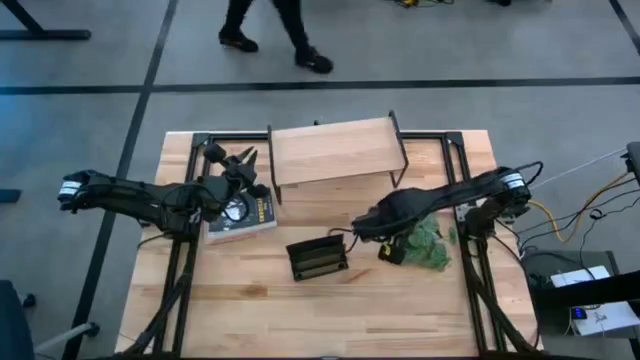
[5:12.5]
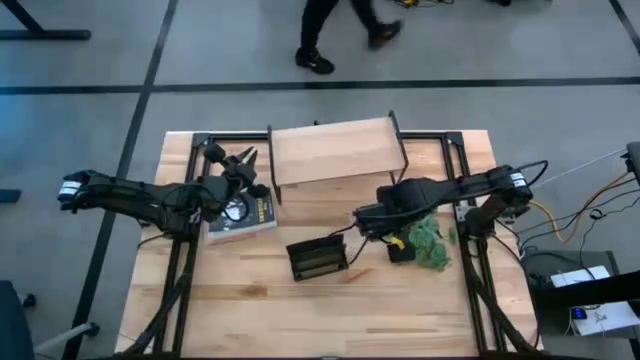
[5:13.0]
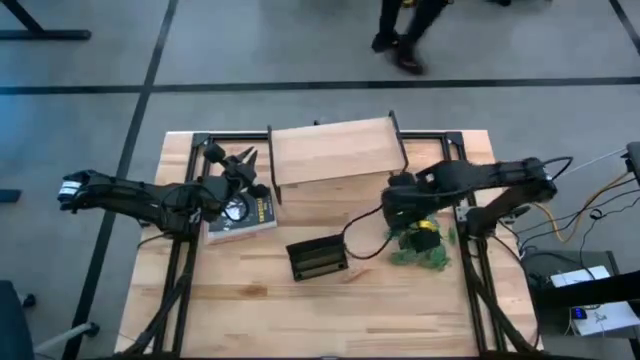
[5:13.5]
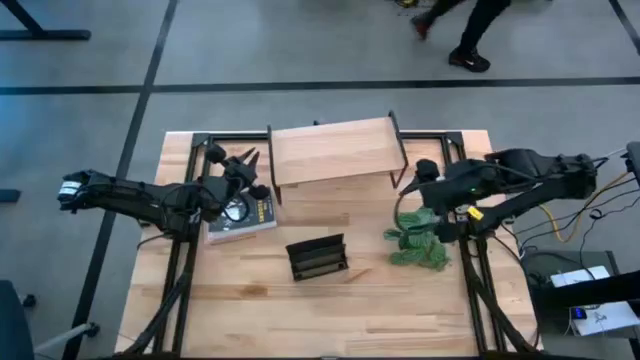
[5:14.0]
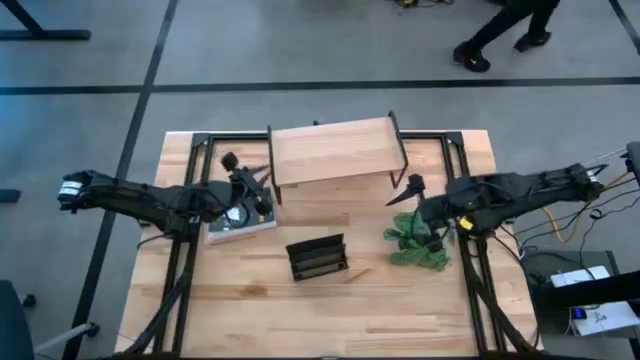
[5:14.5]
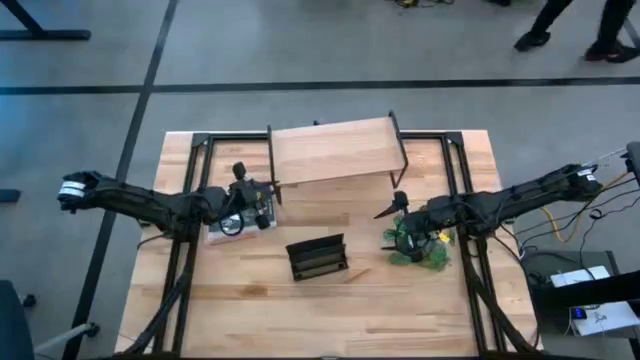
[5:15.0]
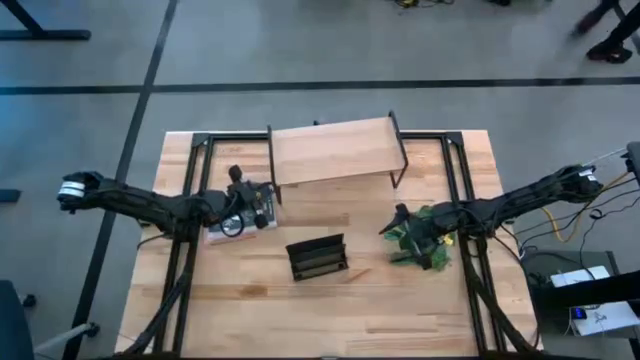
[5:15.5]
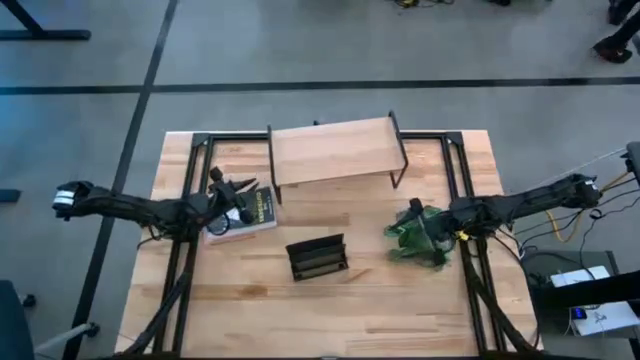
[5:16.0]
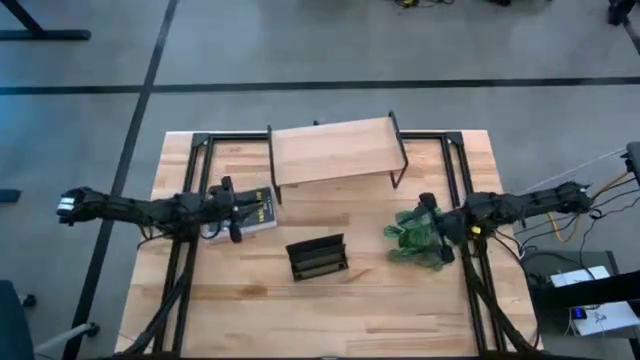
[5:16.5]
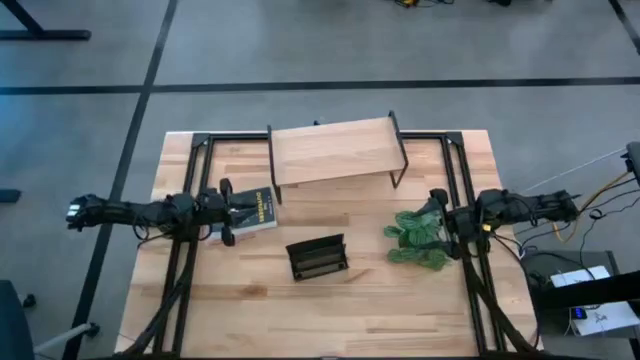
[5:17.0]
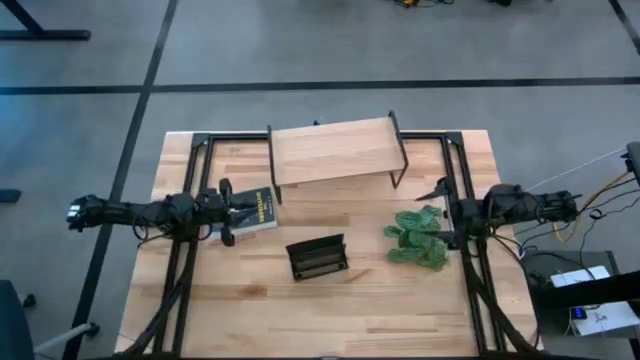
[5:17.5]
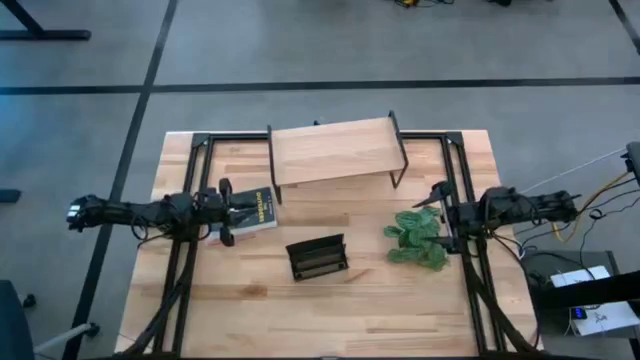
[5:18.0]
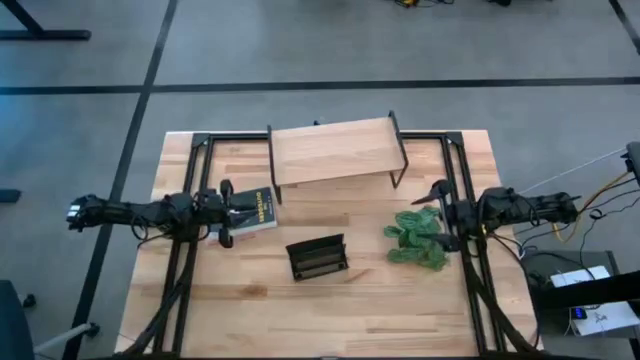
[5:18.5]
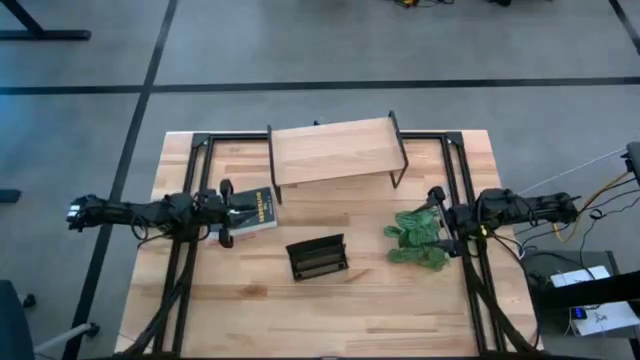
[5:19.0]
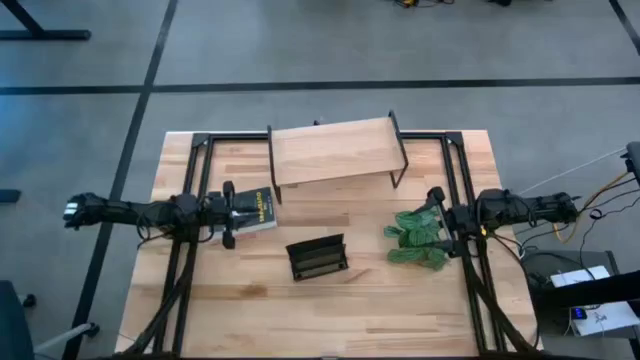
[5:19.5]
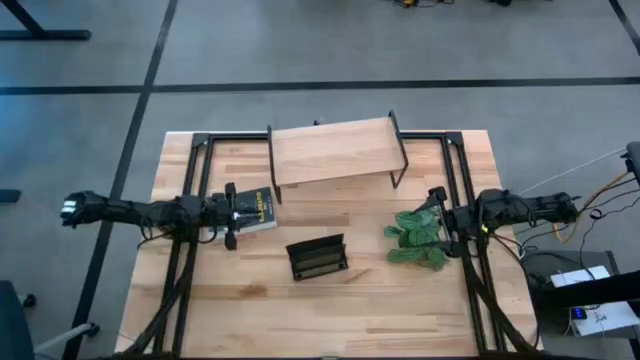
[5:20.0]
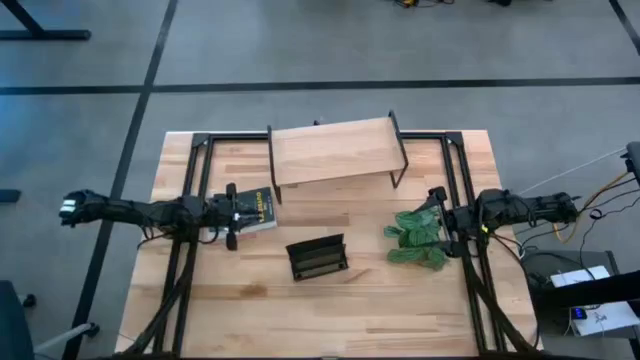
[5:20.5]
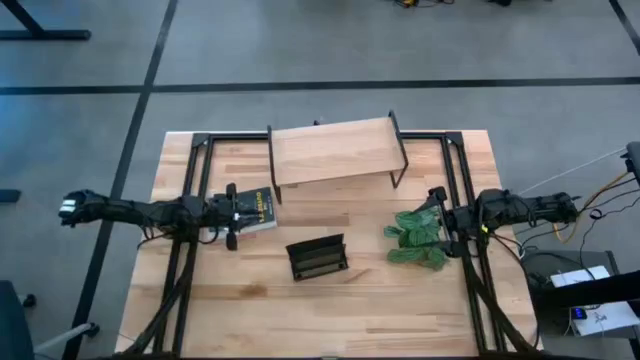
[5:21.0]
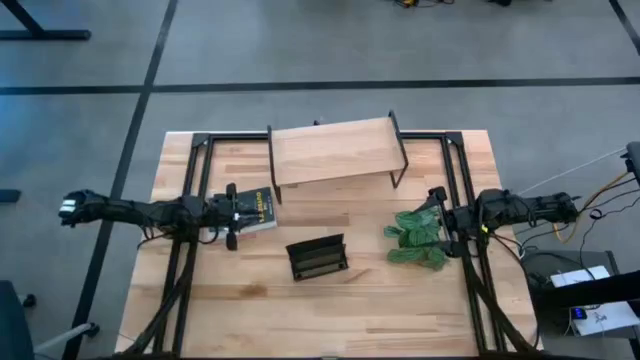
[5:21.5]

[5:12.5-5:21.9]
Task: Stock shelves
Return to Home Position

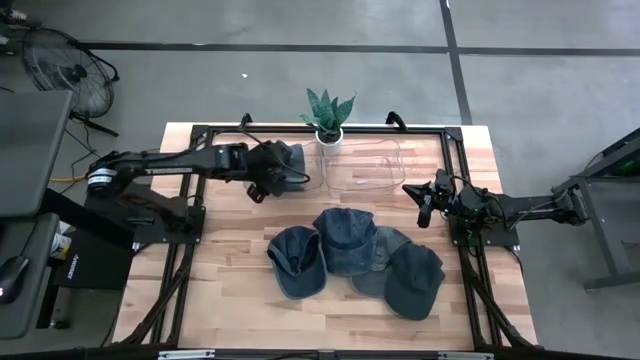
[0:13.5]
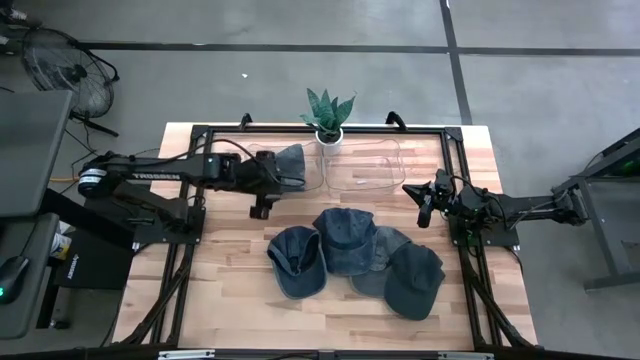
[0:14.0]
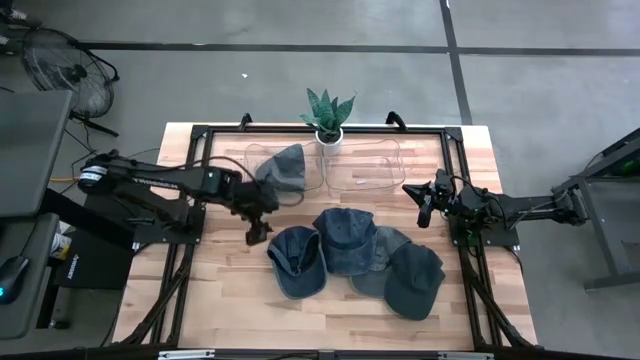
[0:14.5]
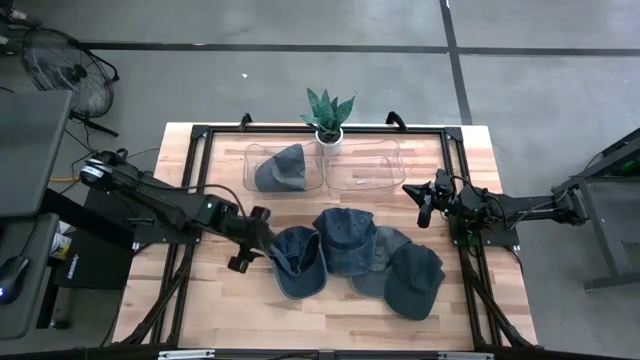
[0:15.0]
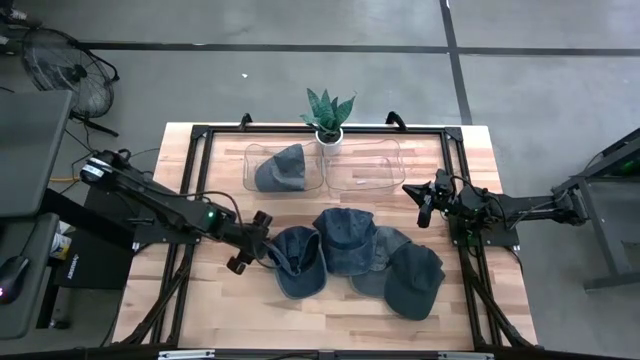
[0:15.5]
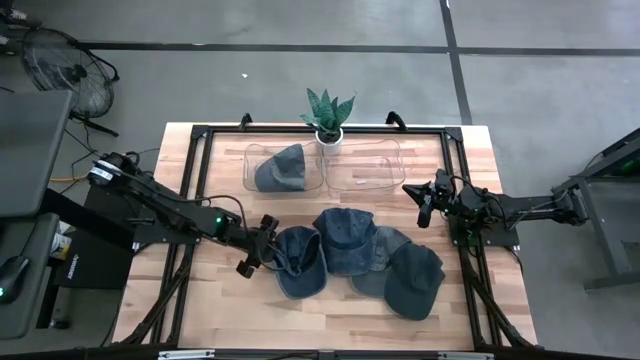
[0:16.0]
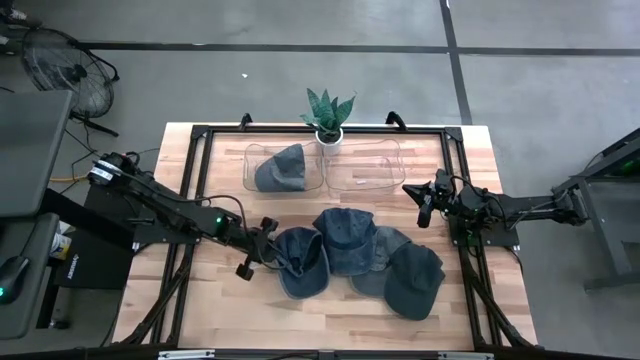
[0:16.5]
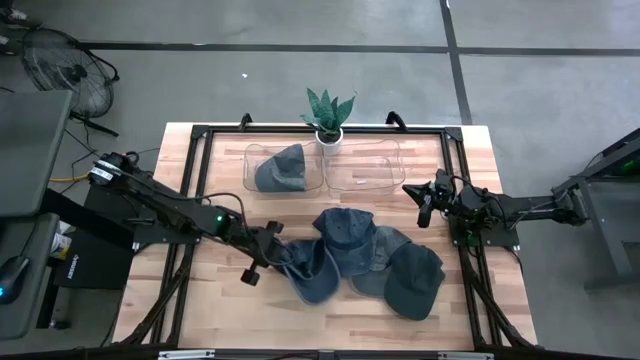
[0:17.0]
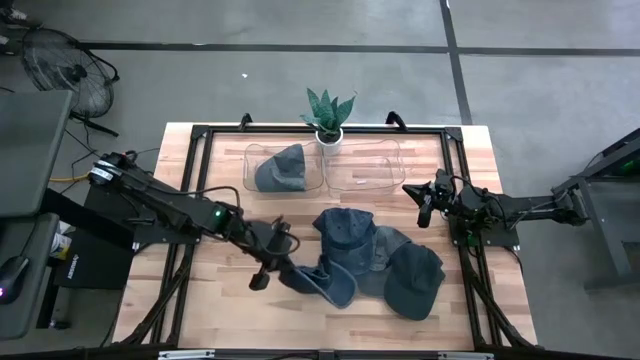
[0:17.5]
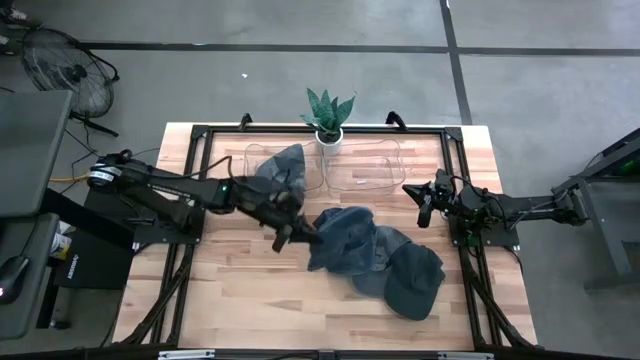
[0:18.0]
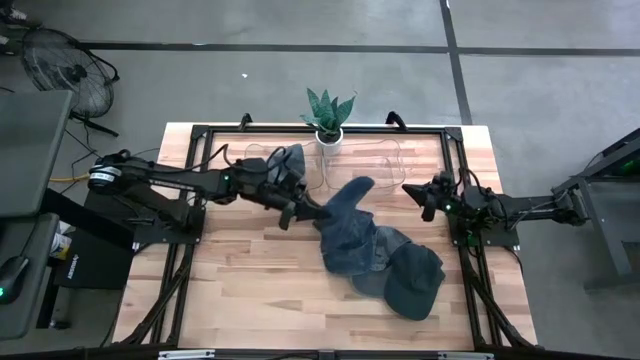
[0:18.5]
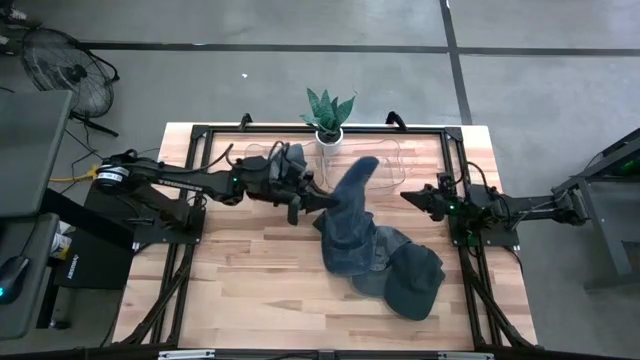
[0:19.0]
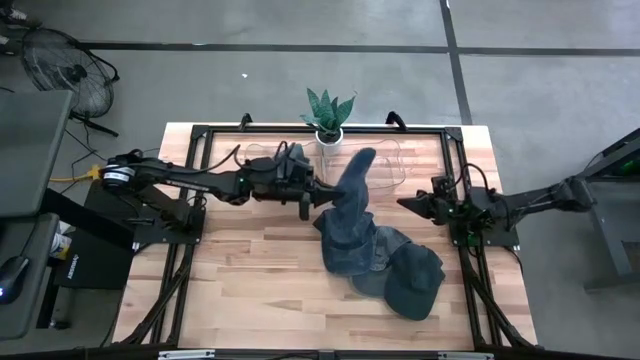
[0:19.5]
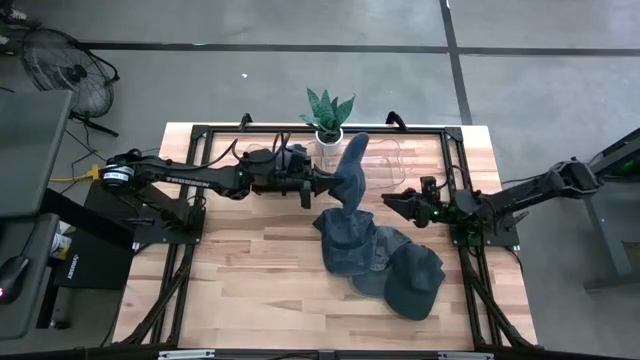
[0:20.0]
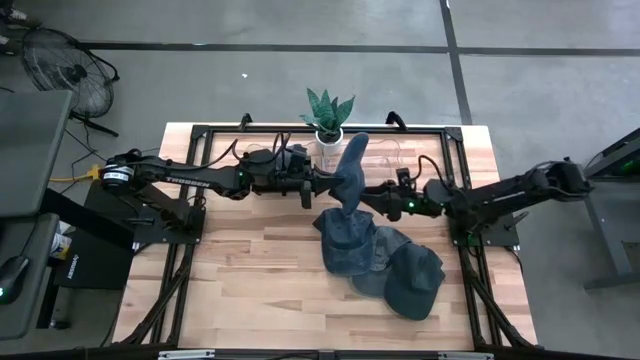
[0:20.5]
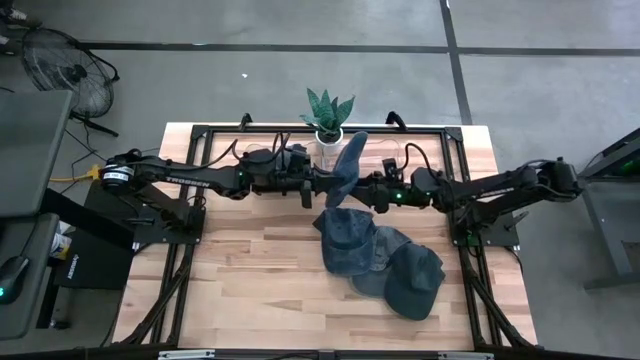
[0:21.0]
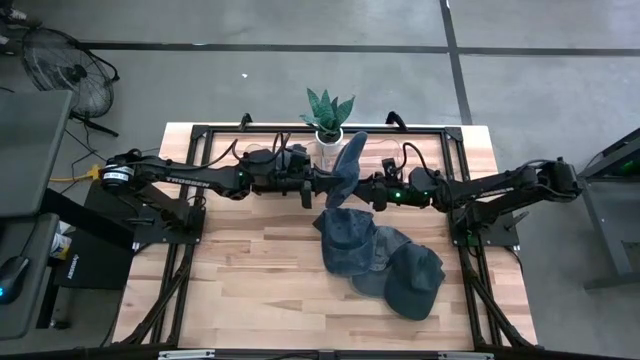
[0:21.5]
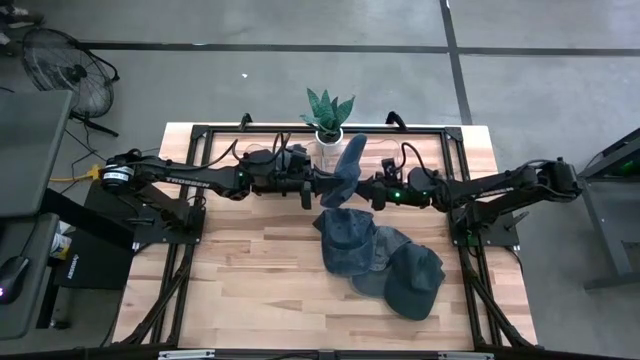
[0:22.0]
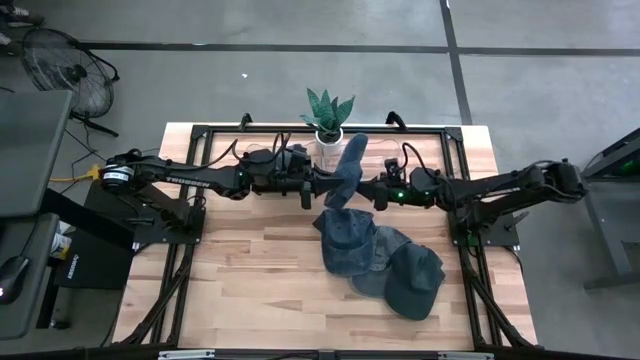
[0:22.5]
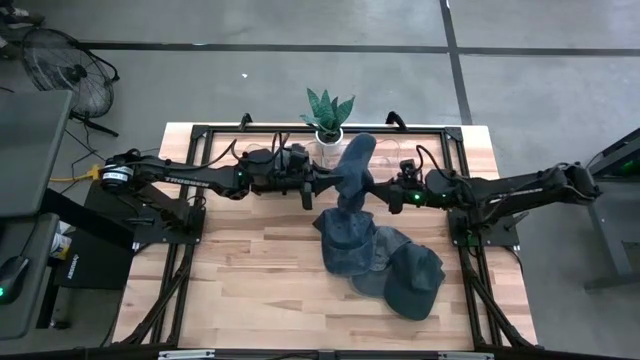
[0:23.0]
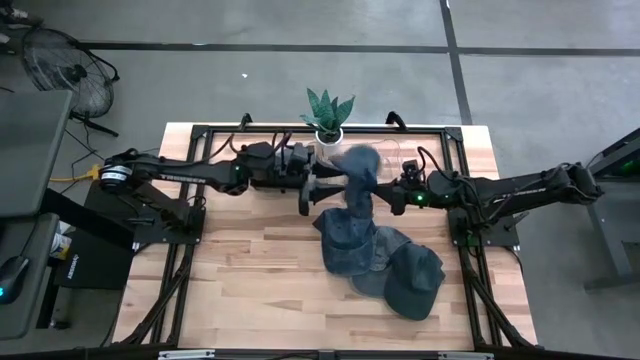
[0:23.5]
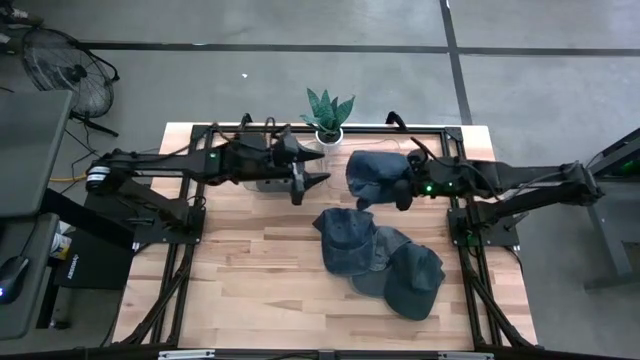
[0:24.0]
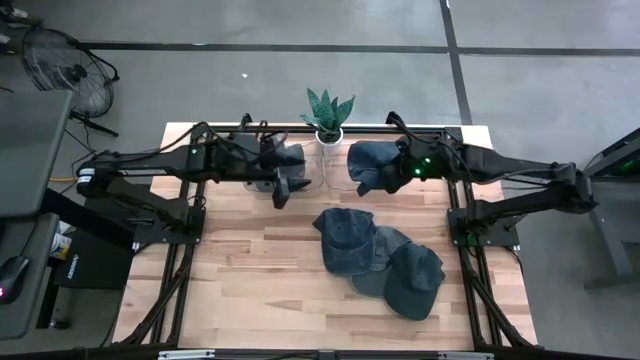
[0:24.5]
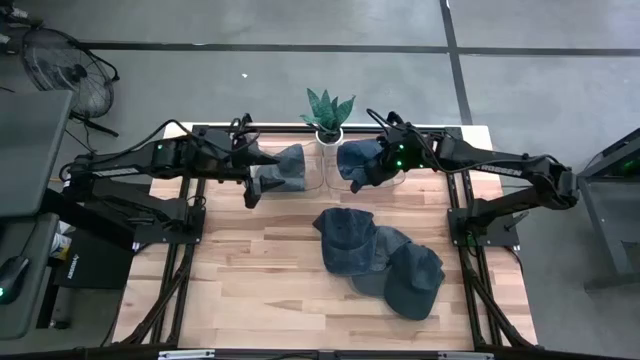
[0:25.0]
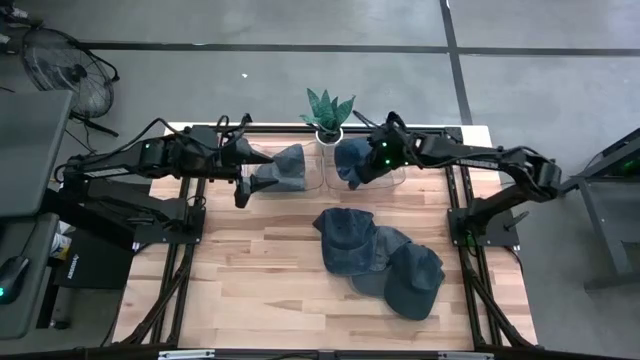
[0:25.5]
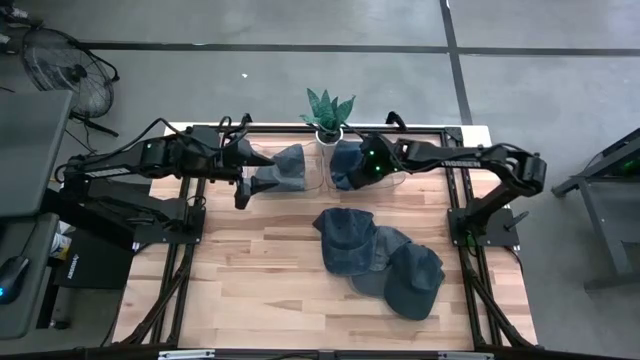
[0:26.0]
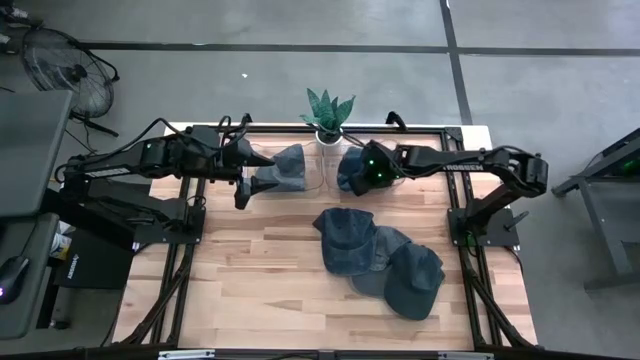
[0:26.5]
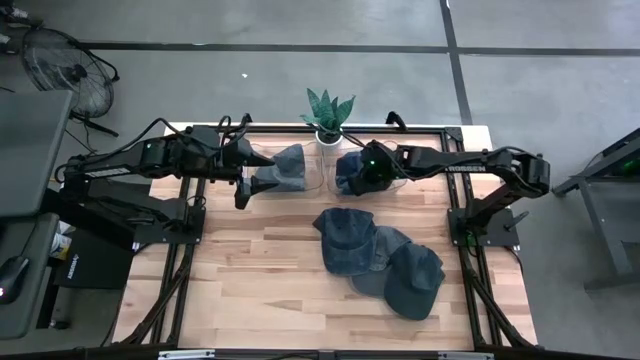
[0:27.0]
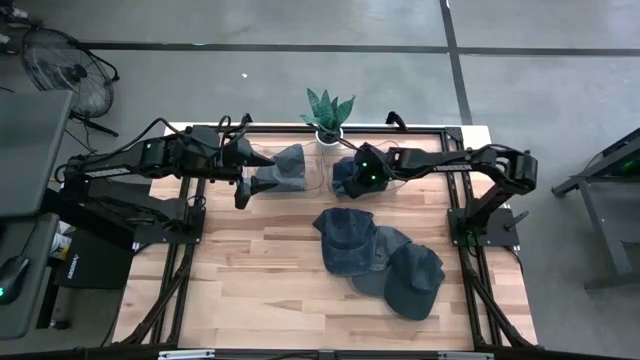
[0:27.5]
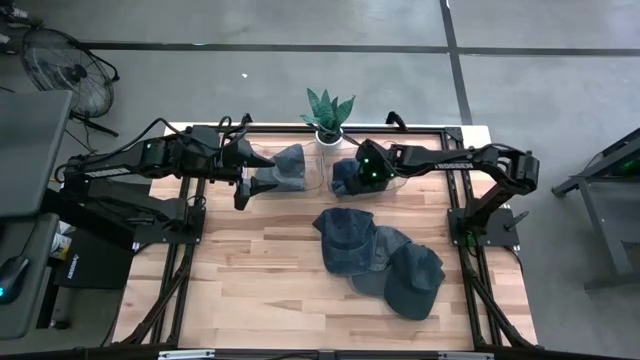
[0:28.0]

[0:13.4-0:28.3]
Task: Pick & Place hat
Put the left dark blue cap into the right transparent bin
